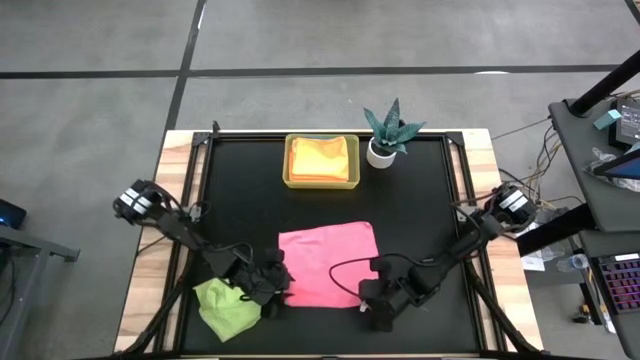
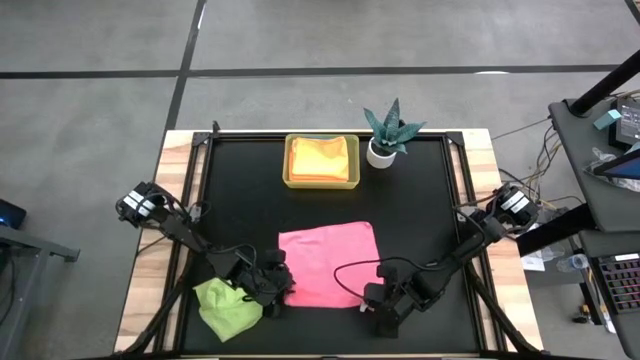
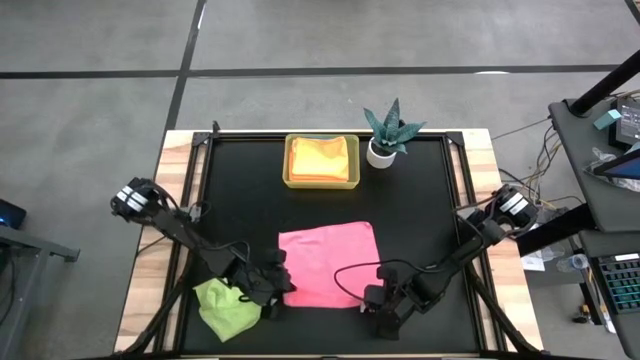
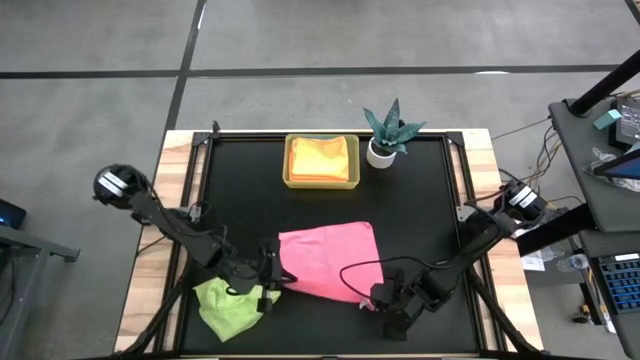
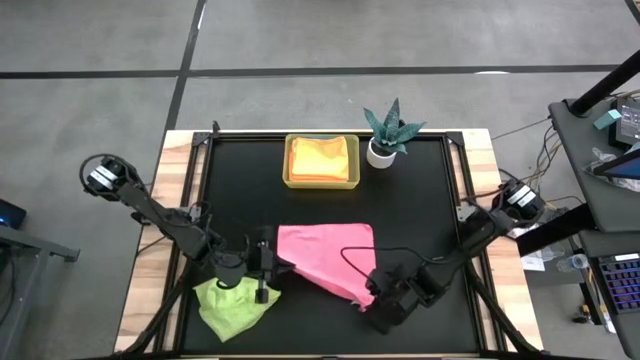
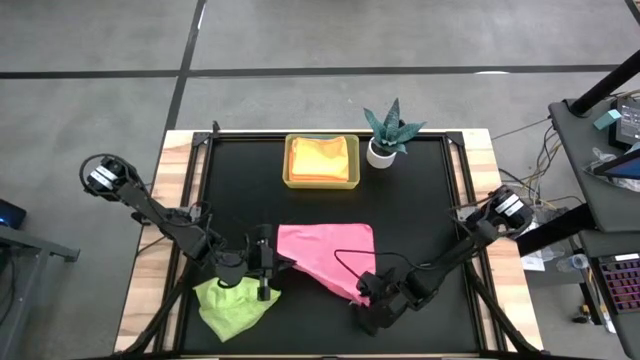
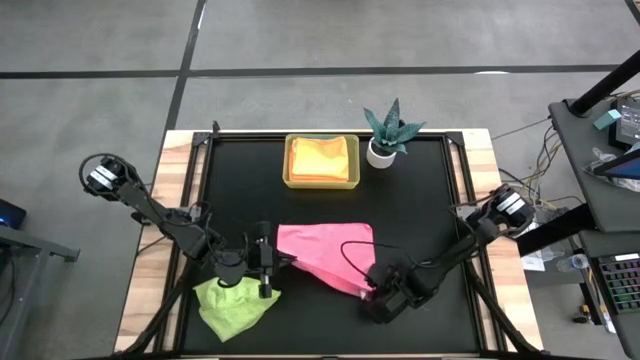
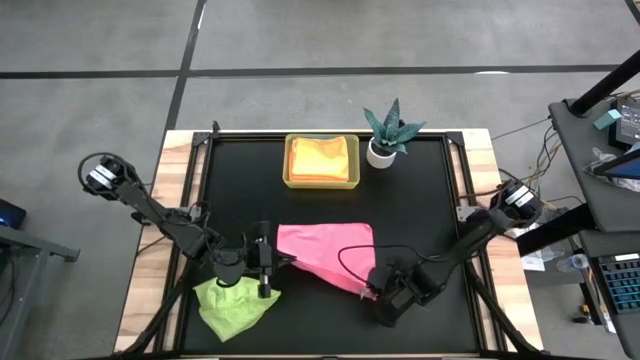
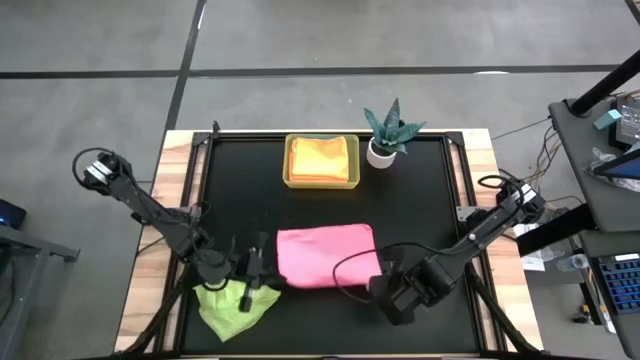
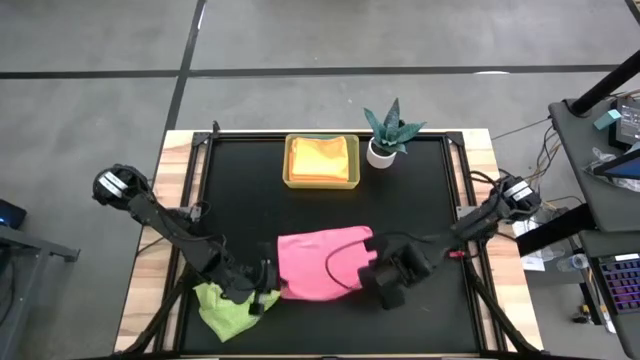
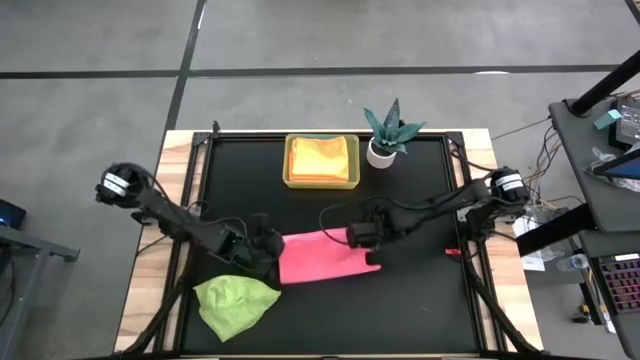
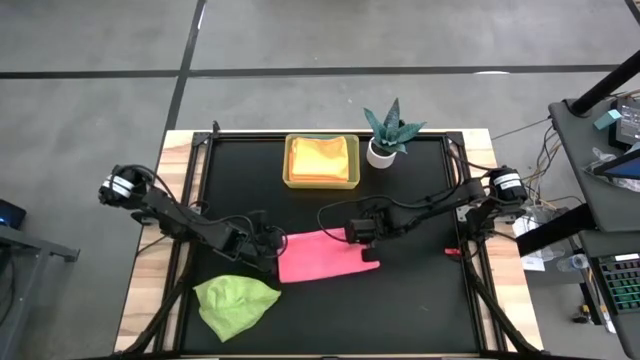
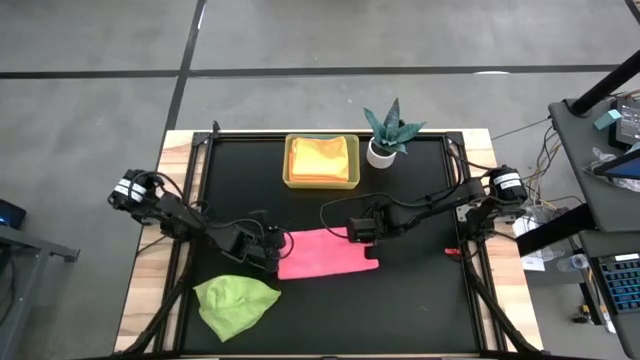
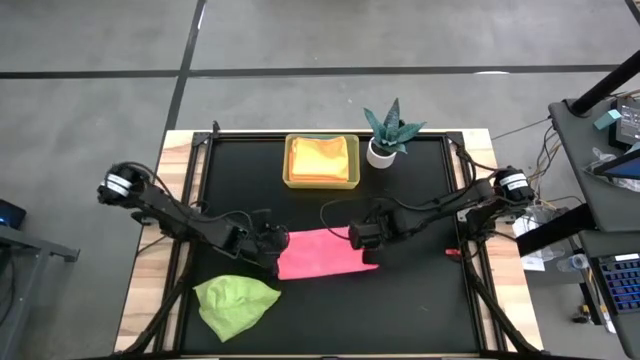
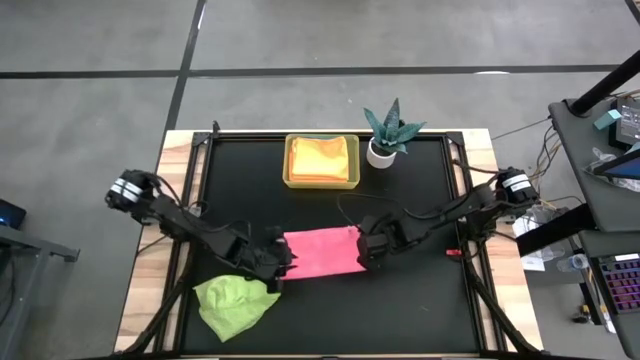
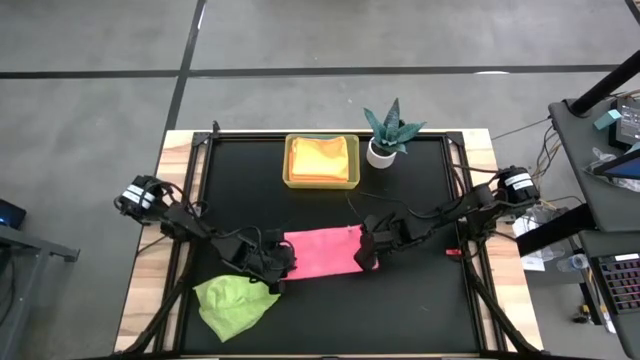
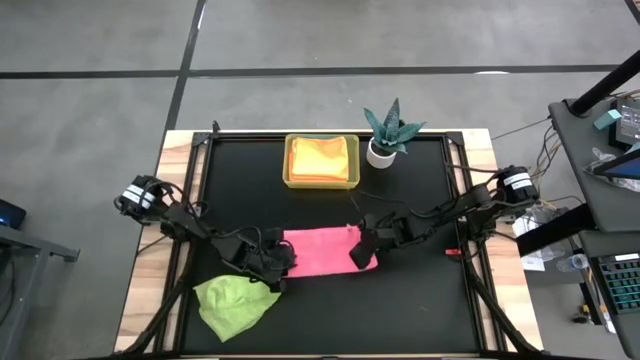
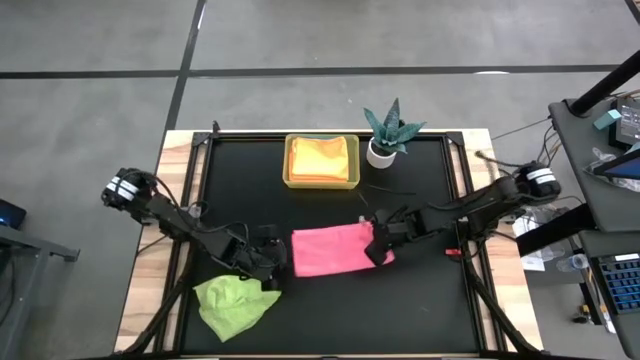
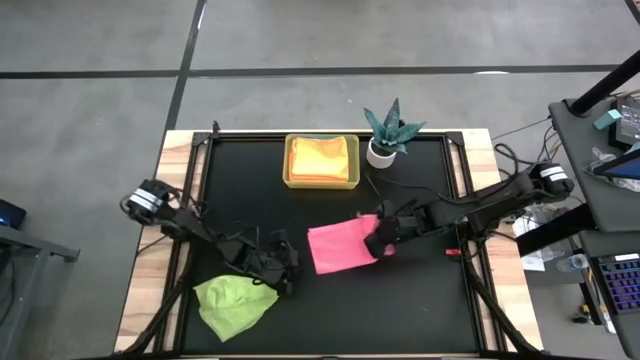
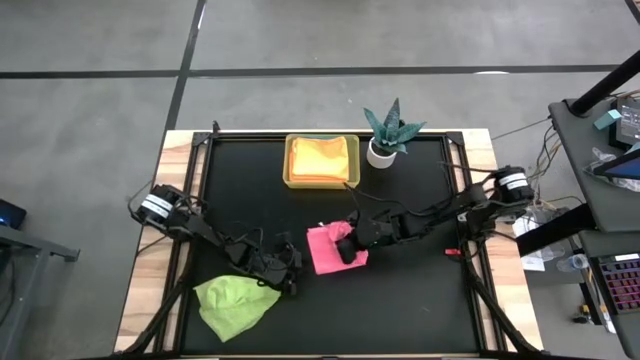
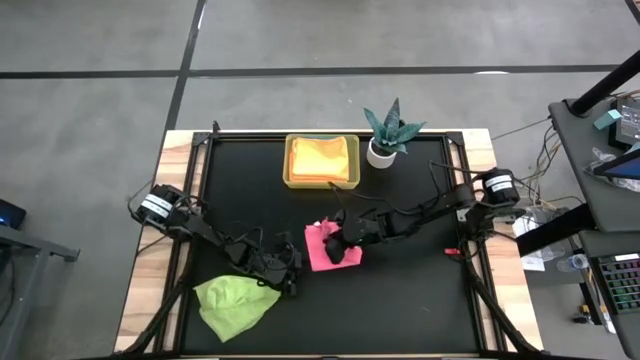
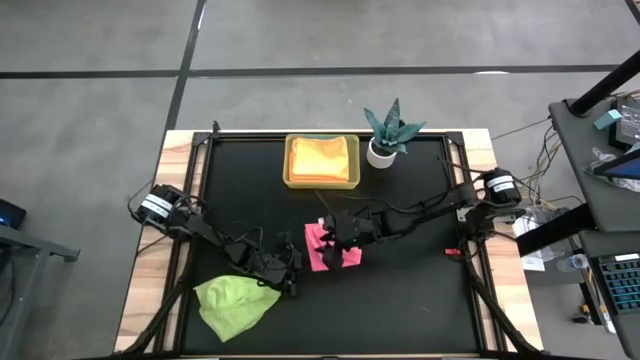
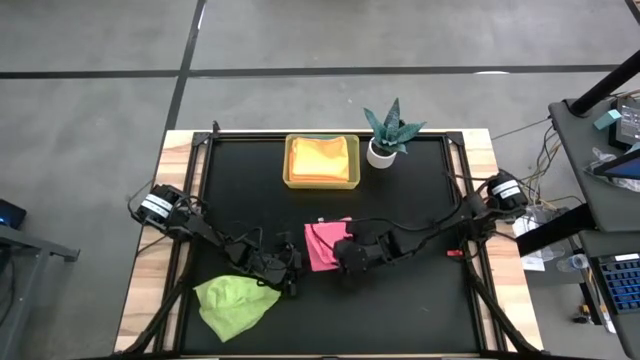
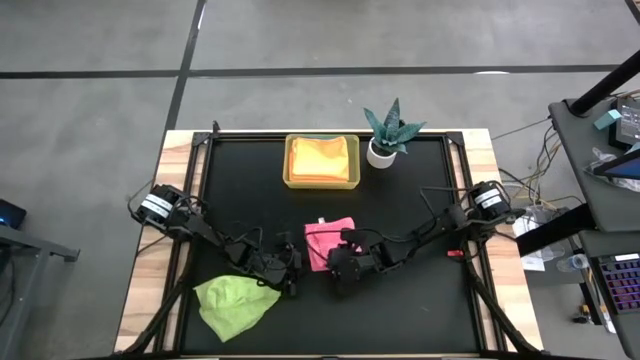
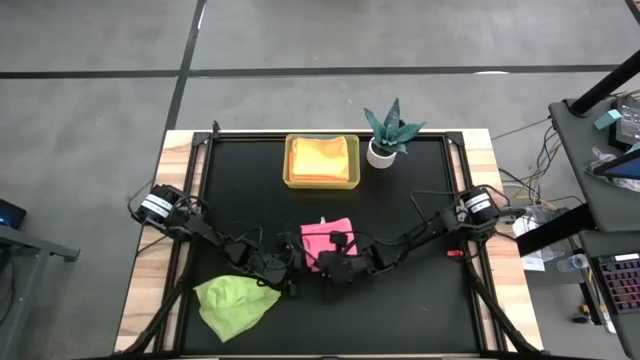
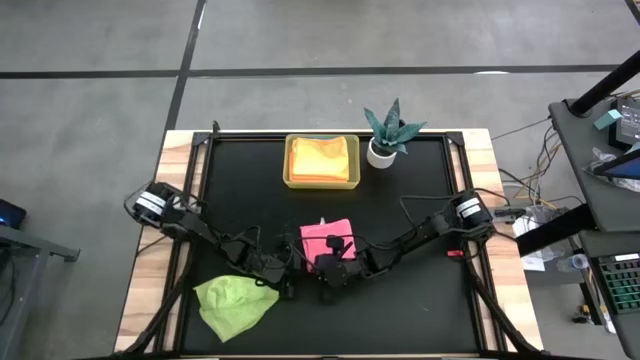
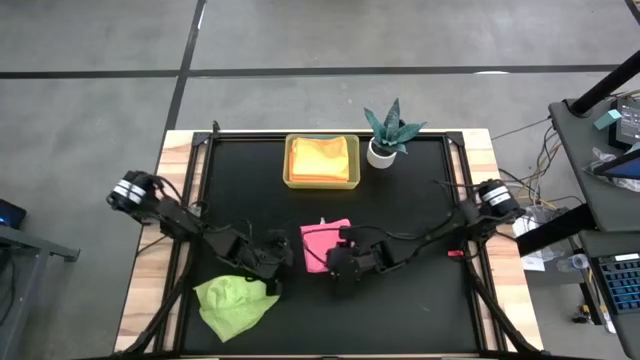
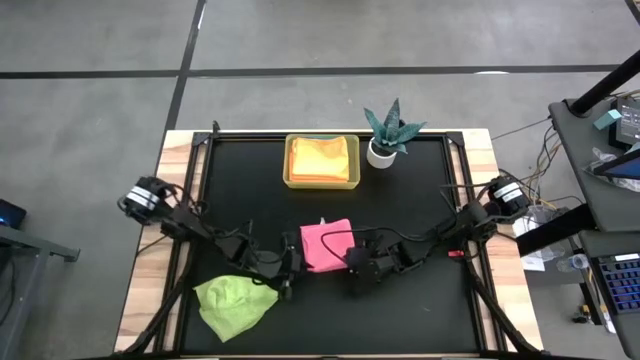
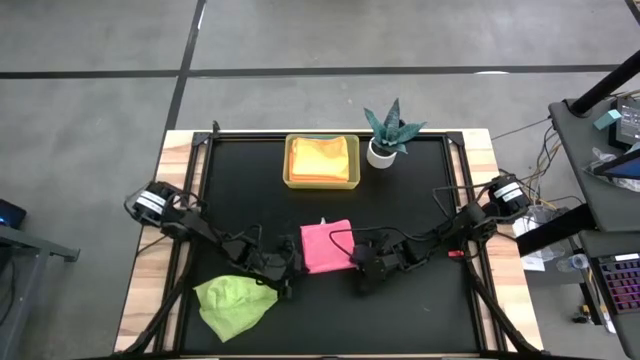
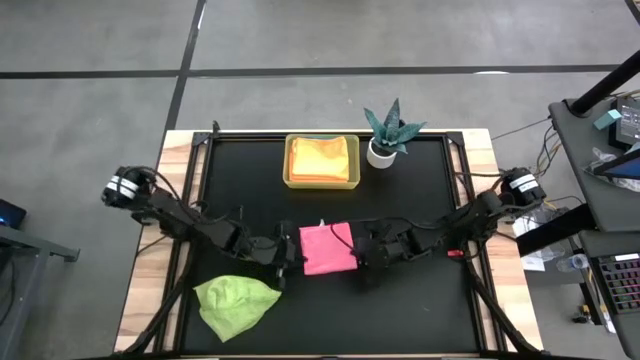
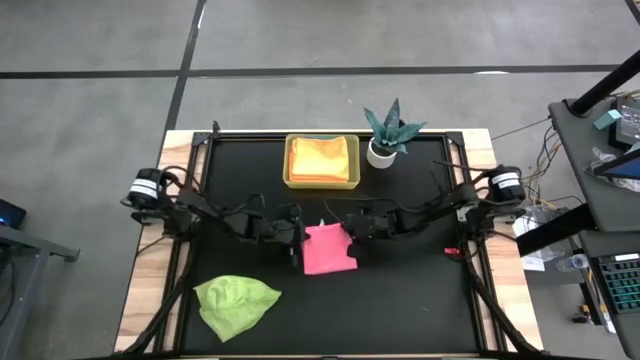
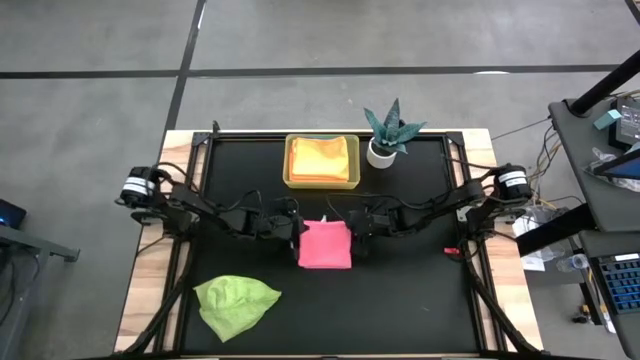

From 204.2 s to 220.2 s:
Task: Fold microfiber towels
Fold the pink microfiber cloth

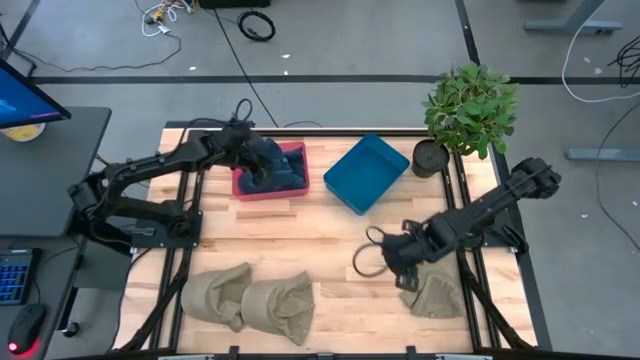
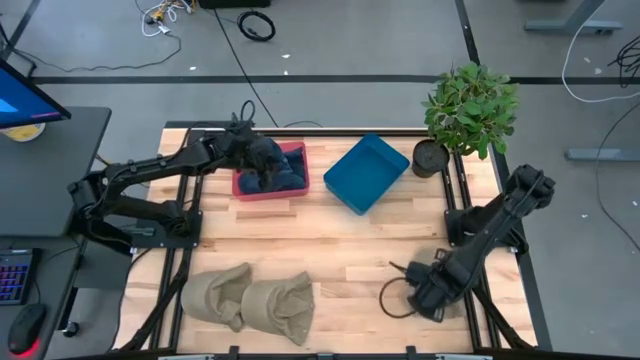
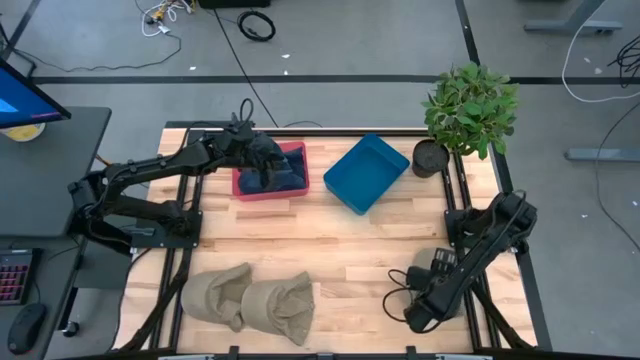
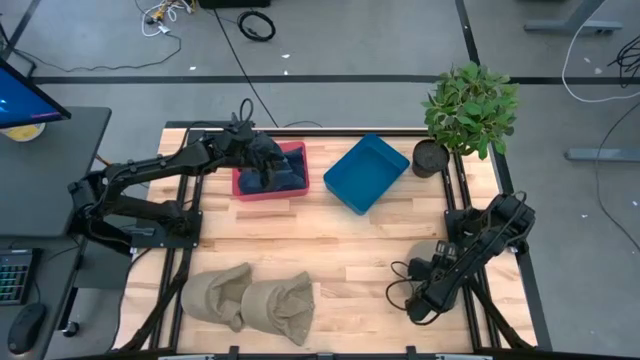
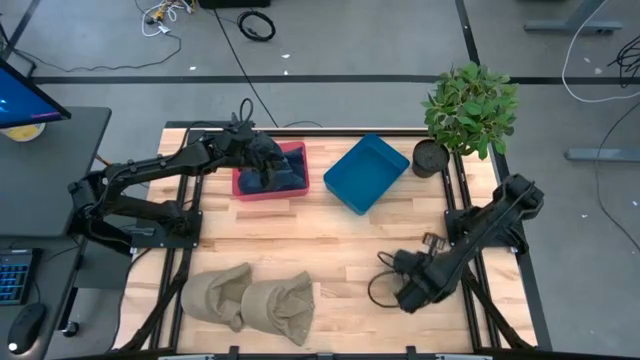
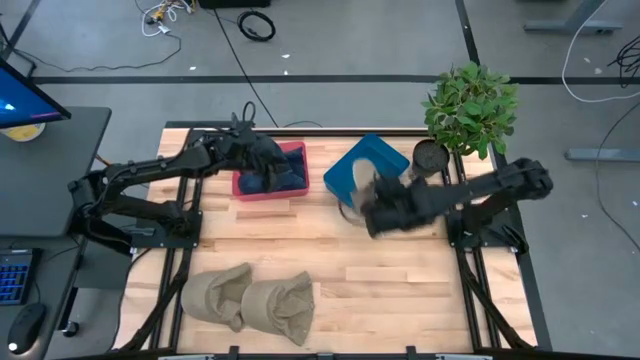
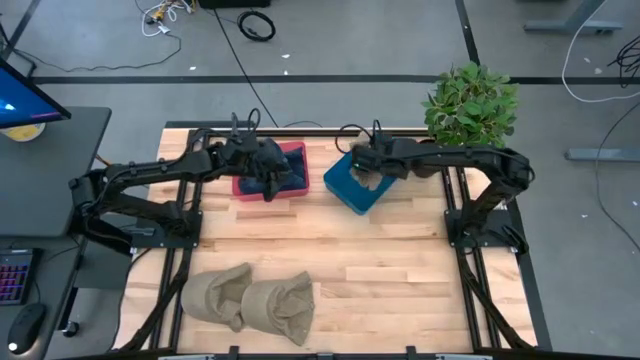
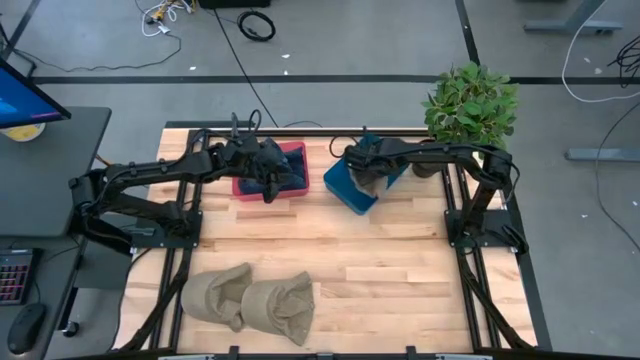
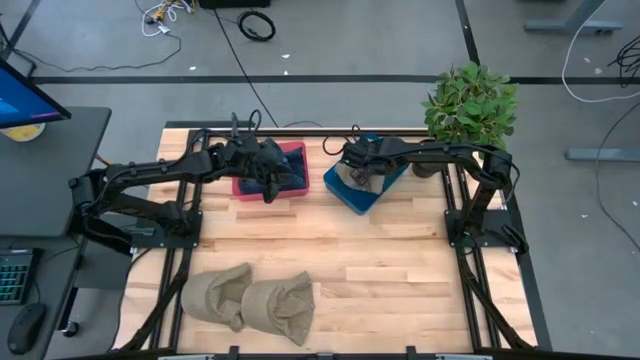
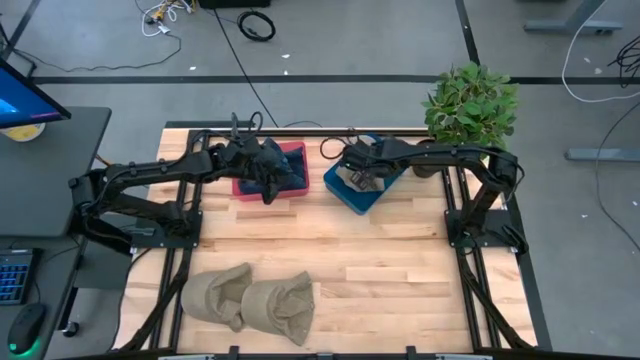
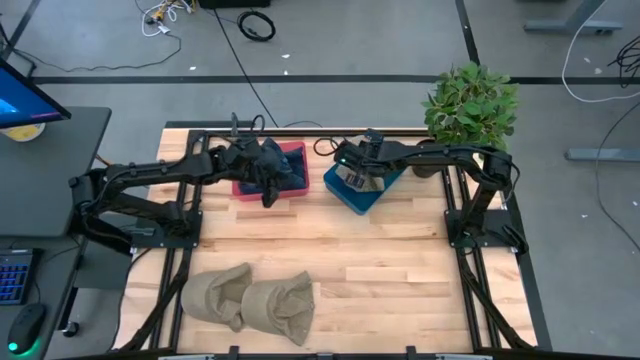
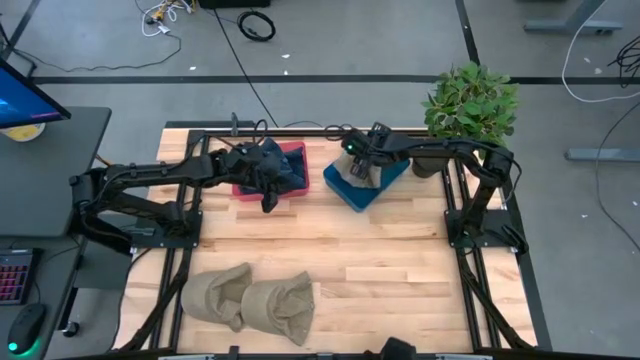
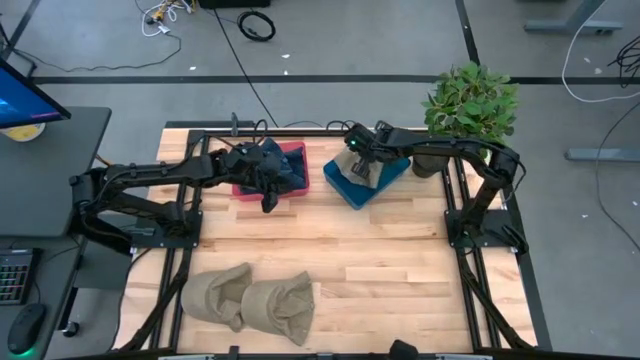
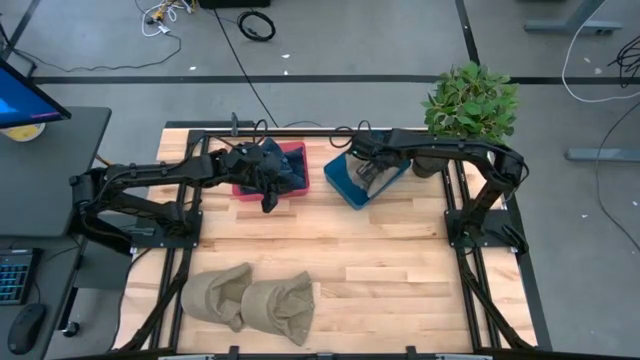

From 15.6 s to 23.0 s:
Task: Pick & Place hat
Put the right gray cap into the blue bin
